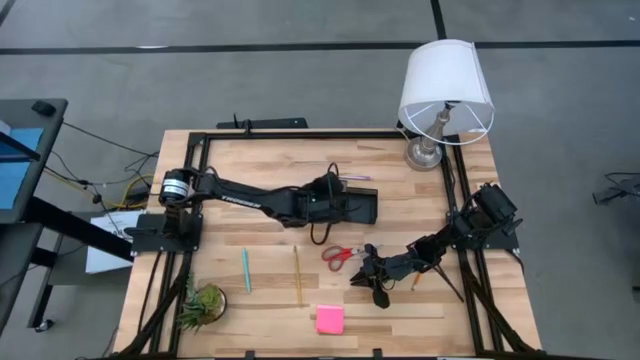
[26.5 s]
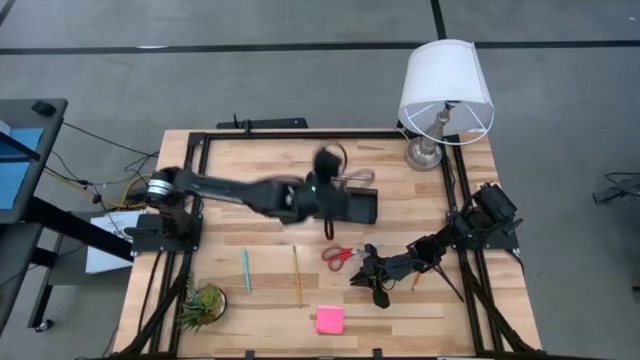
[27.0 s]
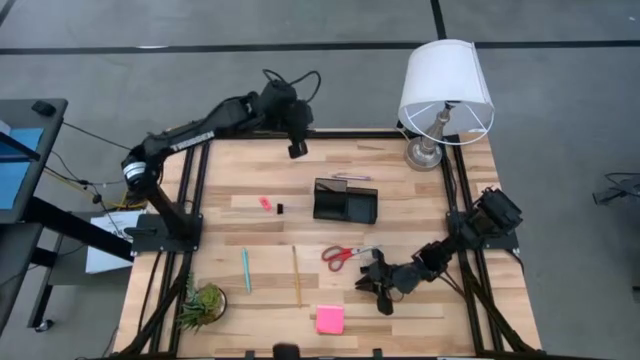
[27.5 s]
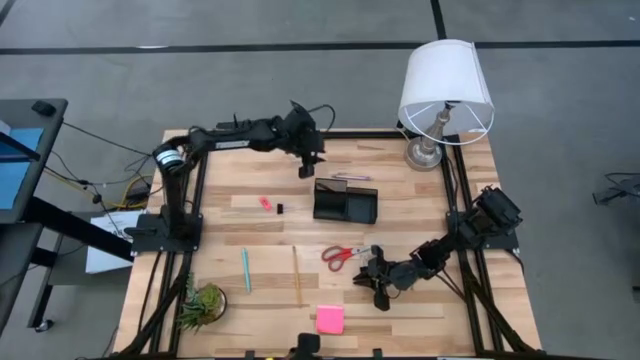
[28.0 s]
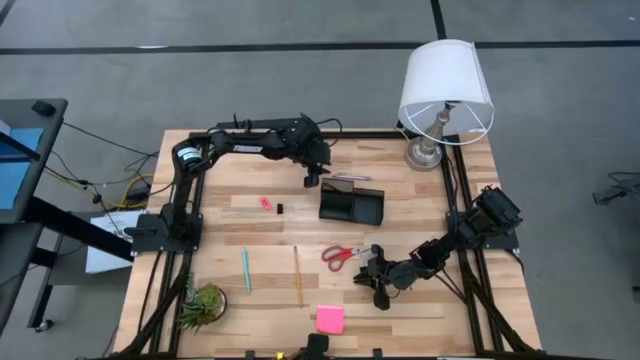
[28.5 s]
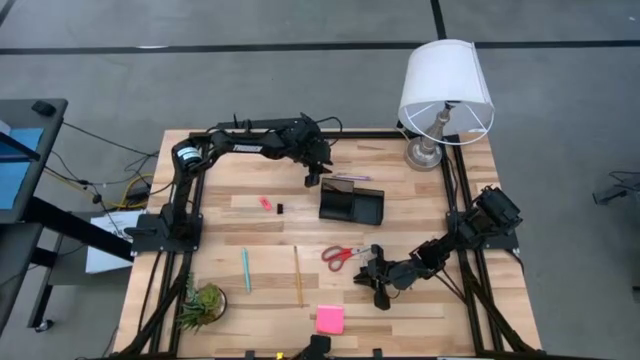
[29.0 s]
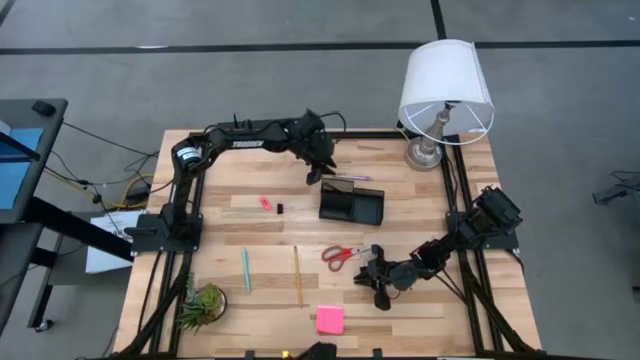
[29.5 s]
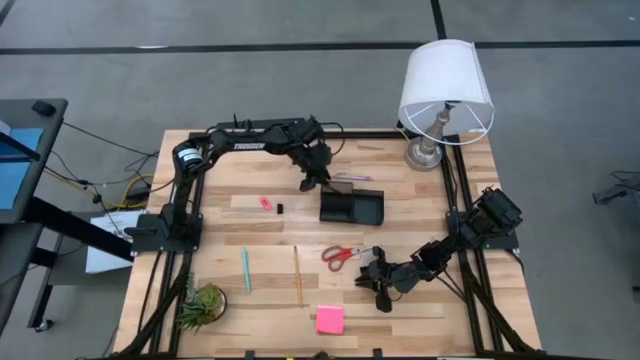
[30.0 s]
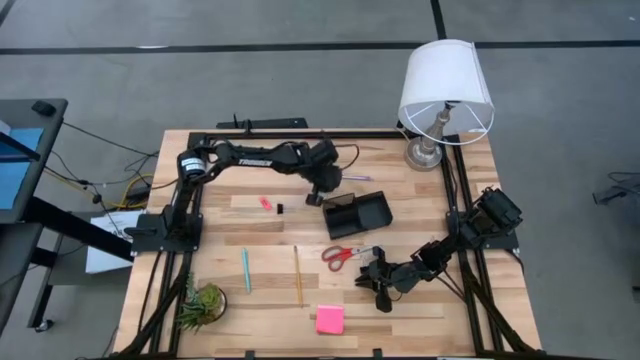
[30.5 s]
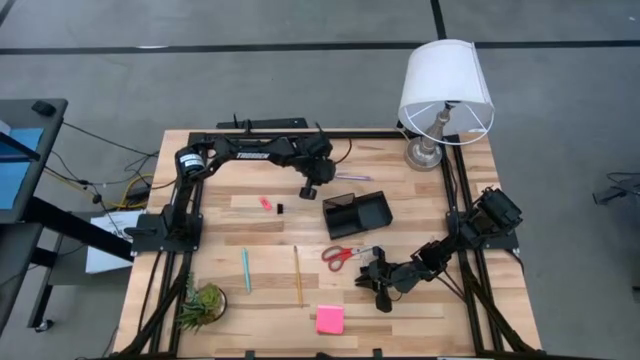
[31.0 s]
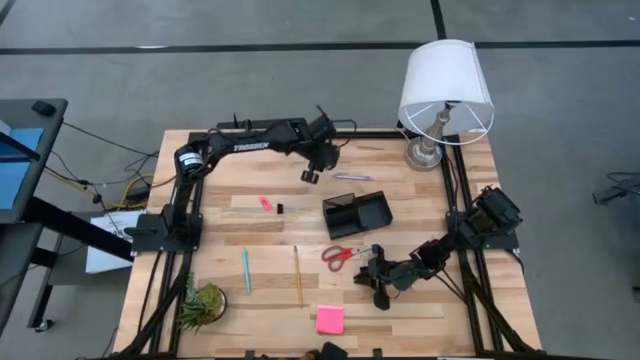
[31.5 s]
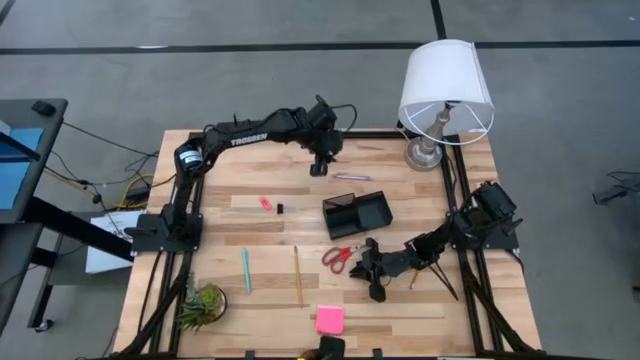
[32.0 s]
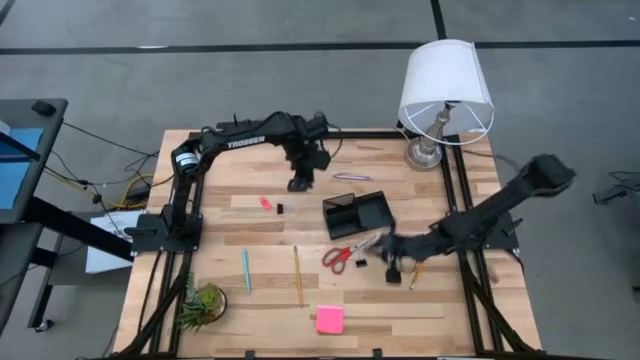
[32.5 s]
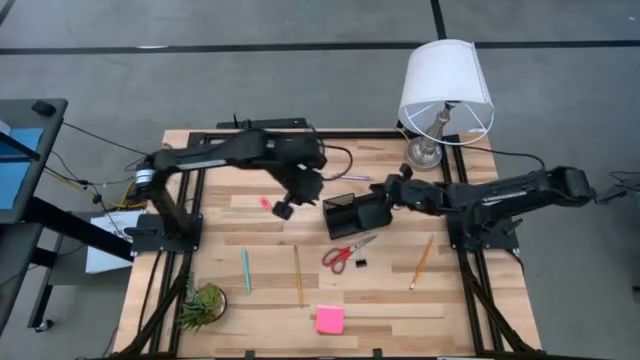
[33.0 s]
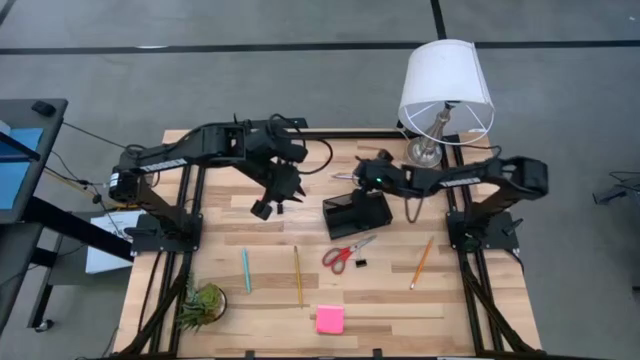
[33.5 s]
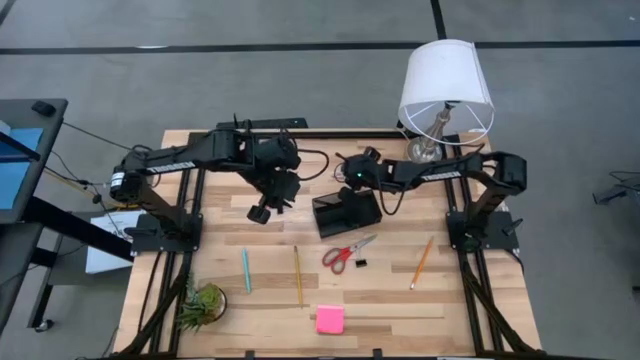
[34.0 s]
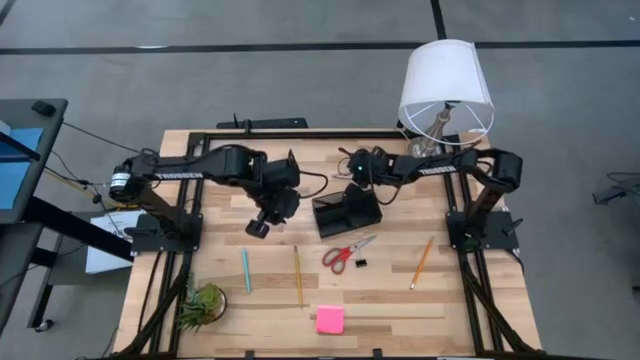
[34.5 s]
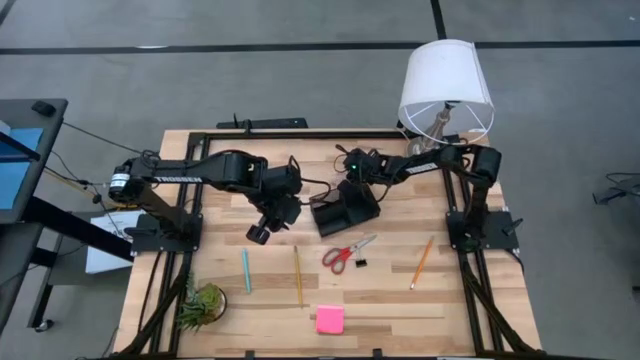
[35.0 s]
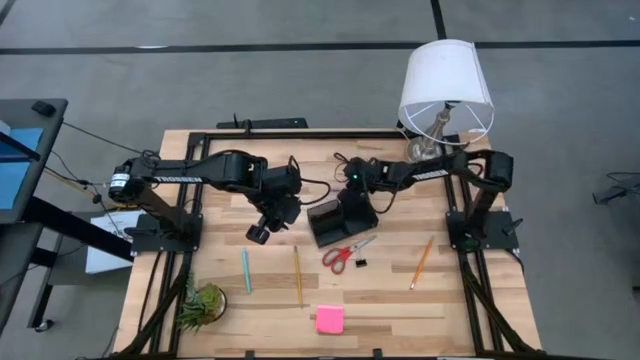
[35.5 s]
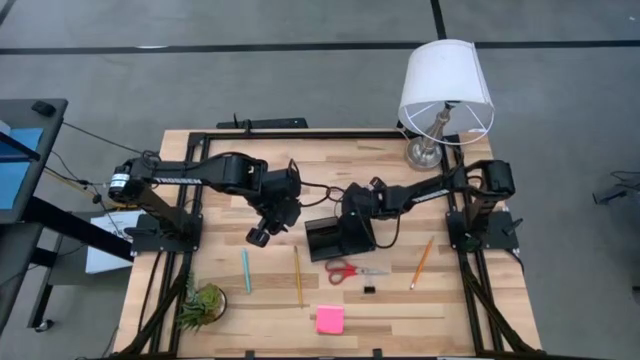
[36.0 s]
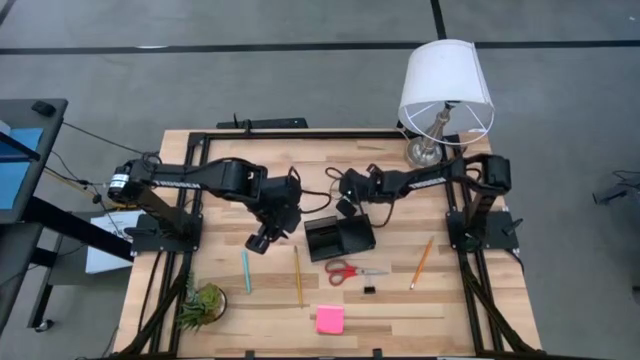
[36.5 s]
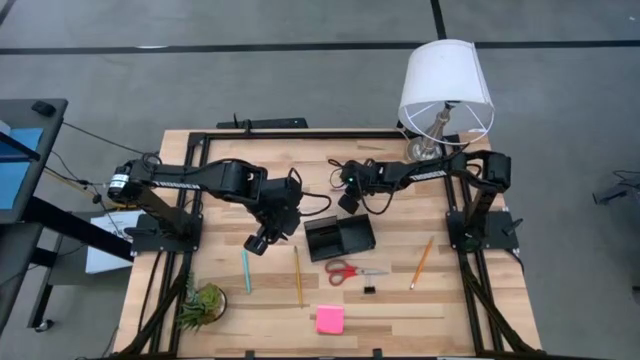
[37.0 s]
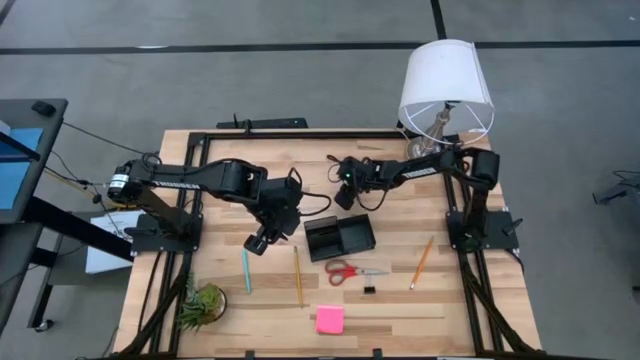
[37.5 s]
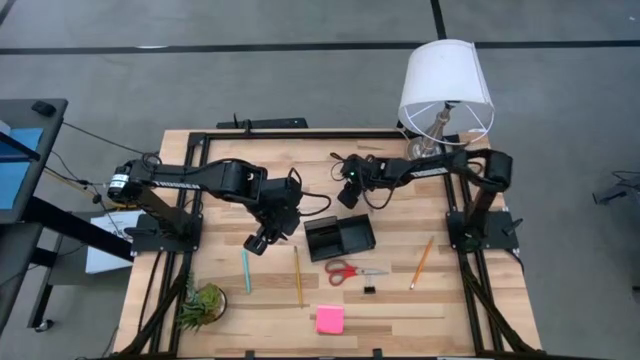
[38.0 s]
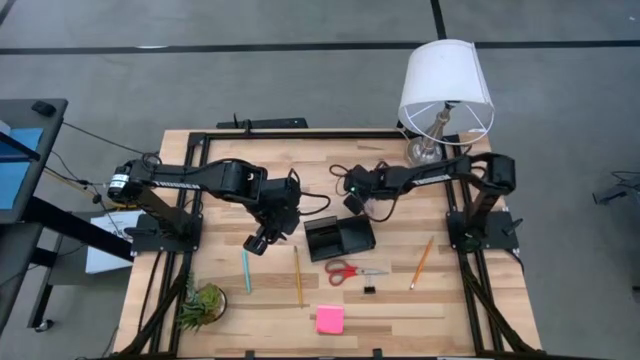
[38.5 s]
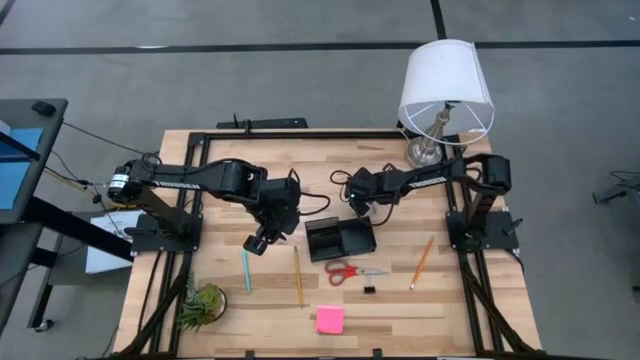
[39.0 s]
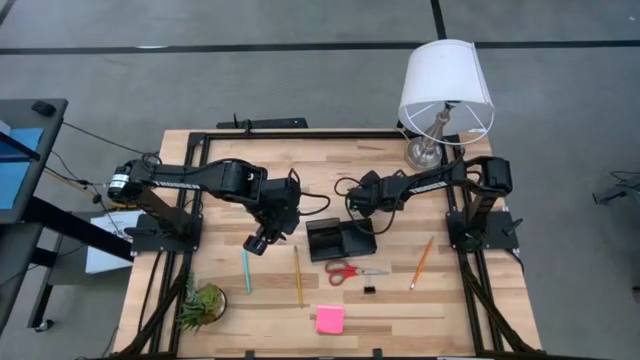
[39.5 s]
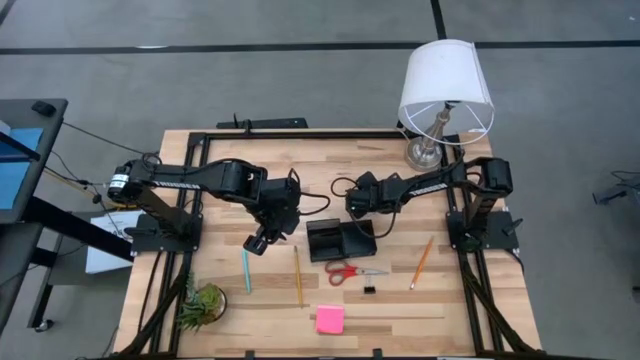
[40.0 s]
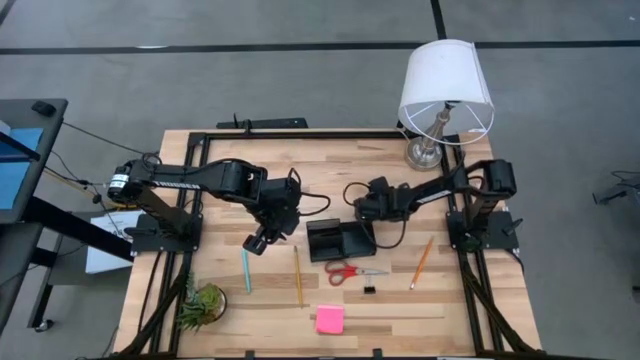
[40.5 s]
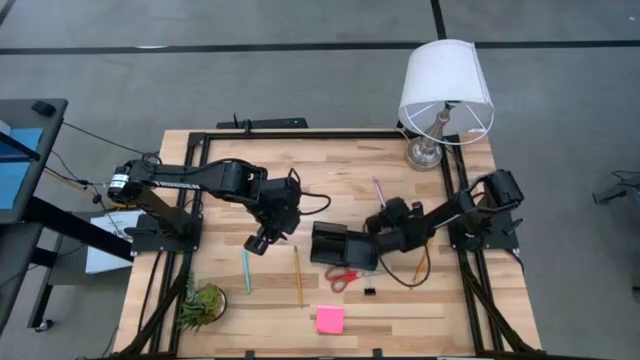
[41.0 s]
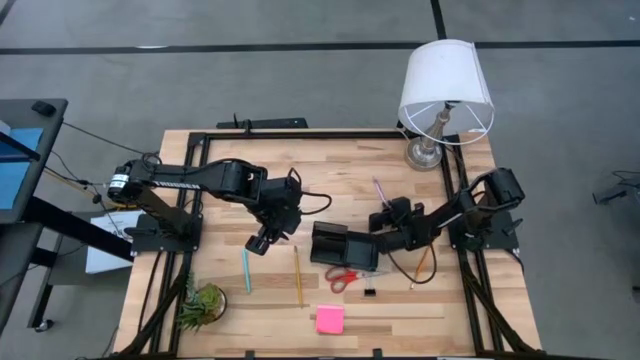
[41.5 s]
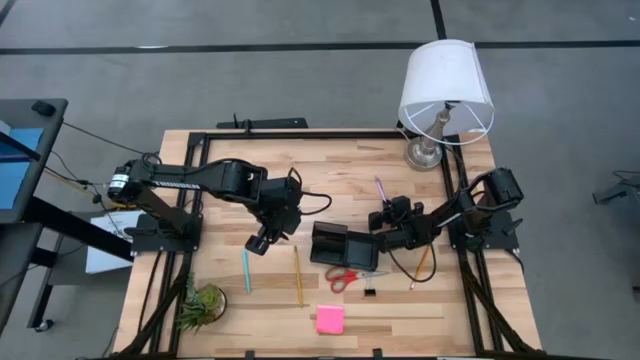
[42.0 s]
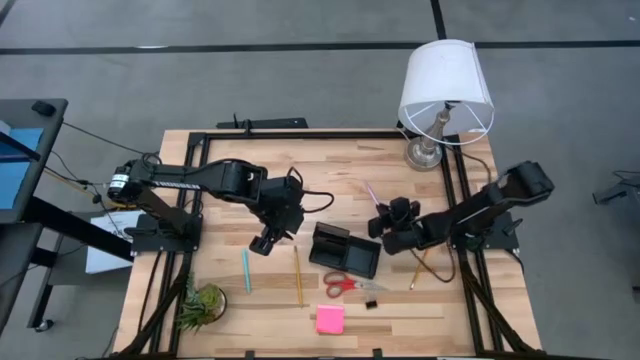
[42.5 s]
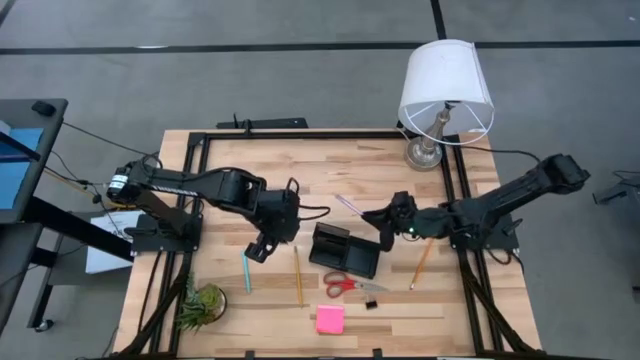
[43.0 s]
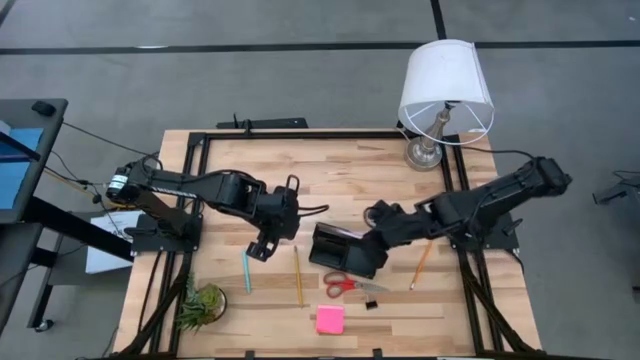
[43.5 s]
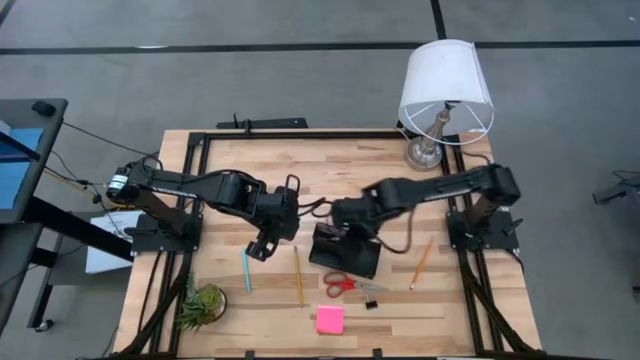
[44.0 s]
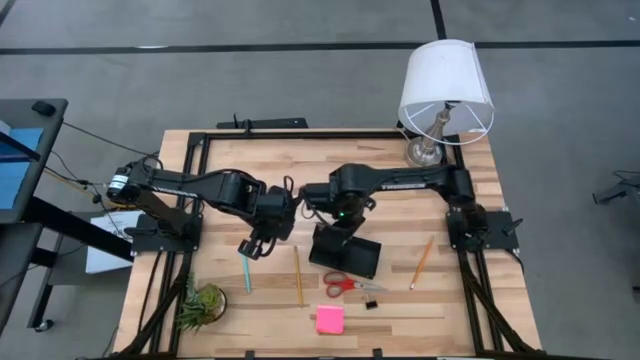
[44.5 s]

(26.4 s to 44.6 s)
Task: Pick and place office supplies into organizer
Put the pink pen into the desk organizer

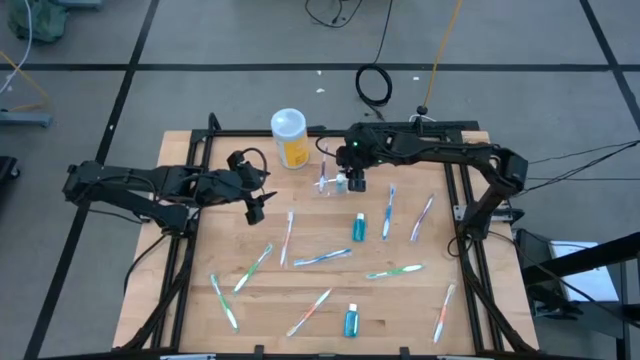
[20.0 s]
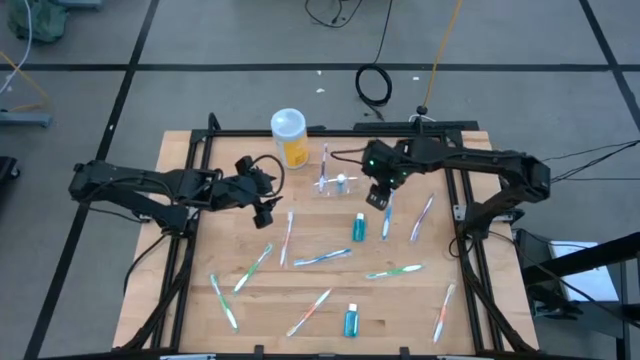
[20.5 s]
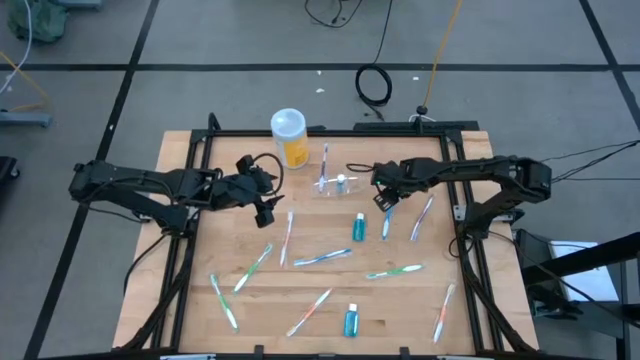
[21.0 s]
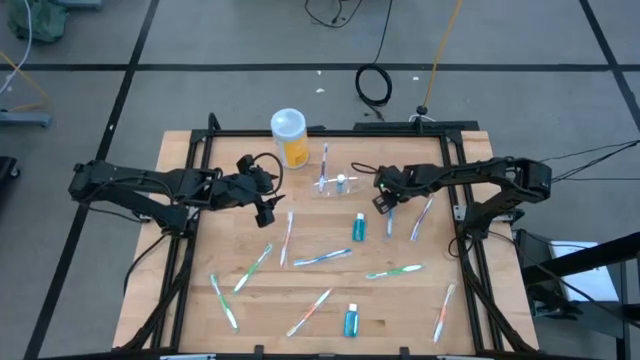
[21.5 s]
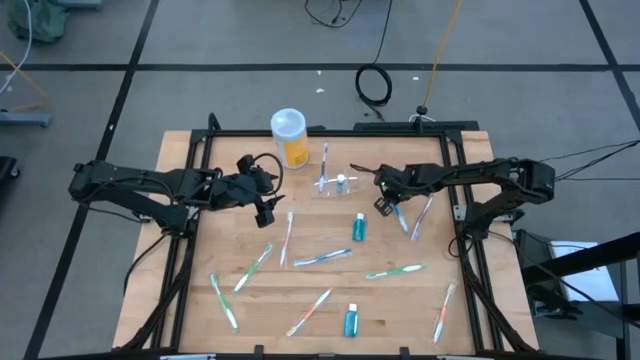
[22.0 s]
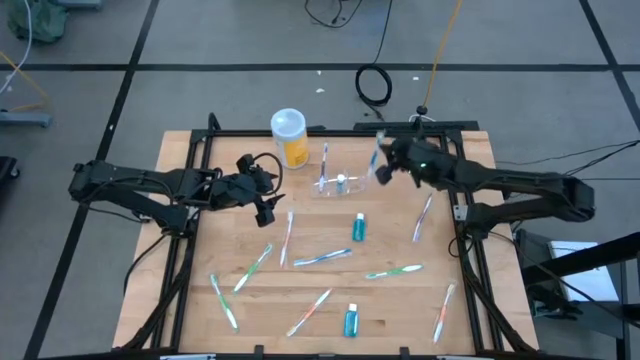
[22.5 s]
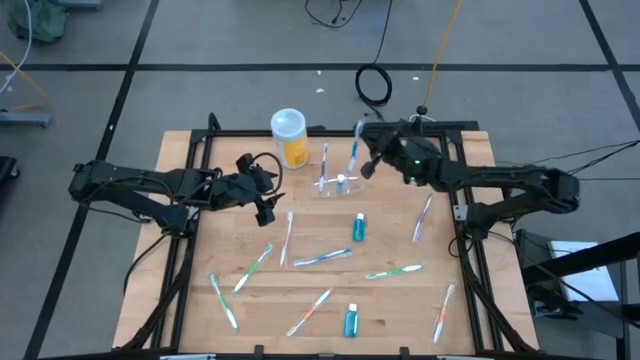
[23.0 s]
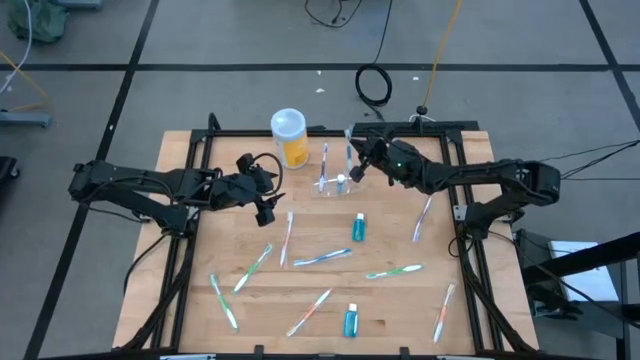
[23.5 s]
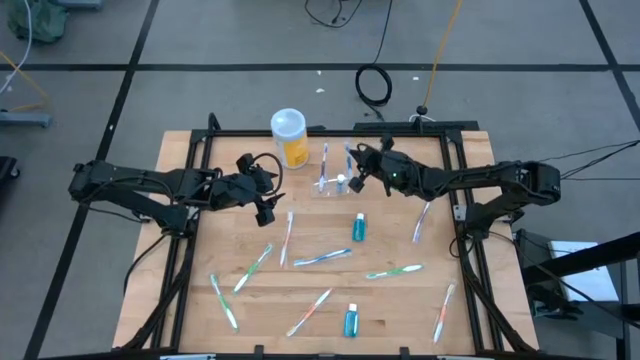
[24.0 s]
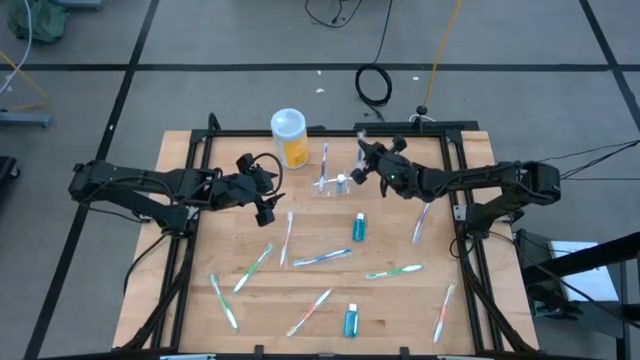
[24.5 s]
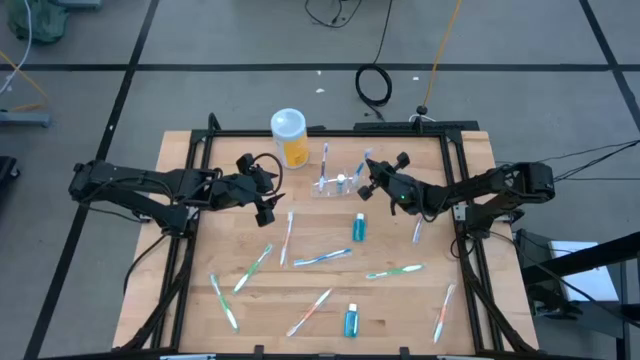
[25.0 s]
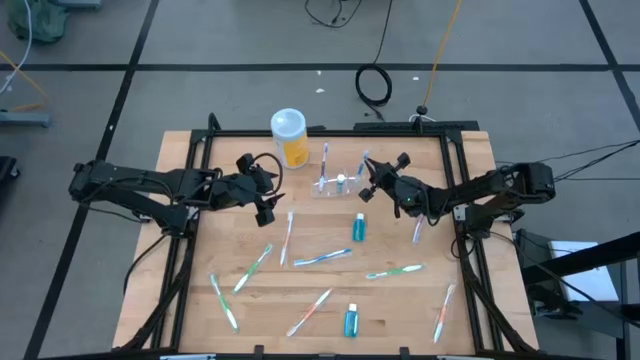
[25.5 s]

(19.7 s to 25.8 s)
Task: Pick & Place toothbrushing station
Put the top blue toothbrush into the transparent organizer
